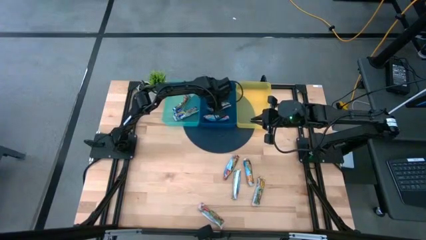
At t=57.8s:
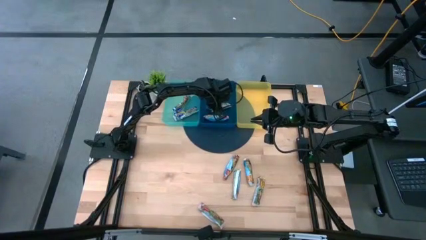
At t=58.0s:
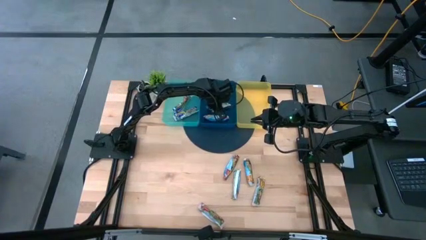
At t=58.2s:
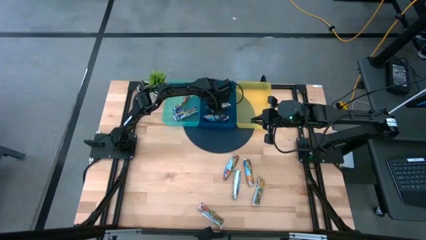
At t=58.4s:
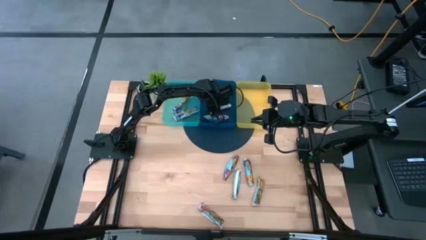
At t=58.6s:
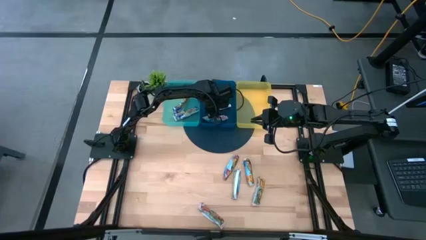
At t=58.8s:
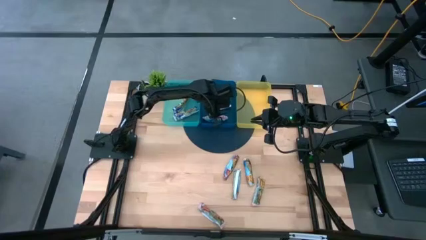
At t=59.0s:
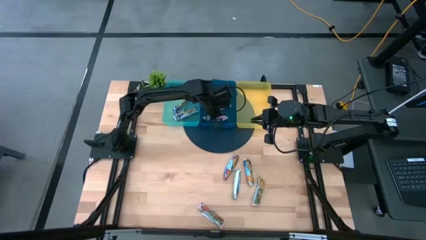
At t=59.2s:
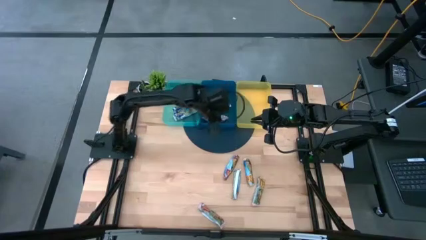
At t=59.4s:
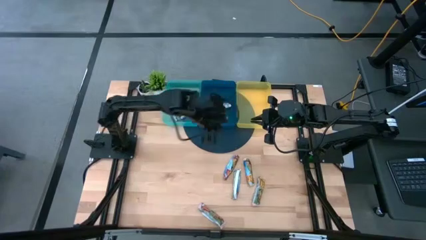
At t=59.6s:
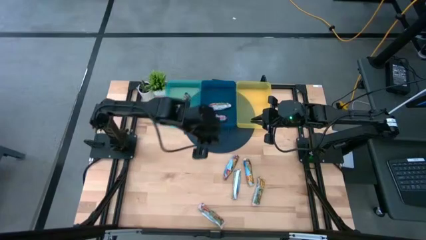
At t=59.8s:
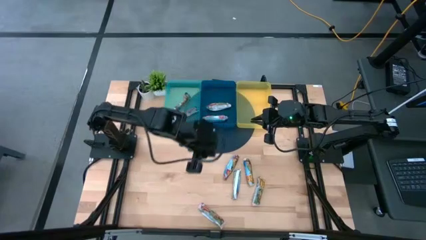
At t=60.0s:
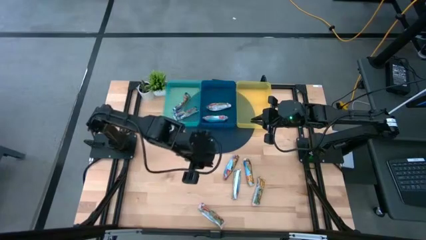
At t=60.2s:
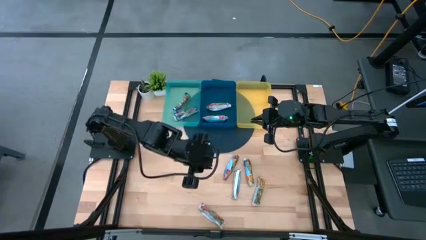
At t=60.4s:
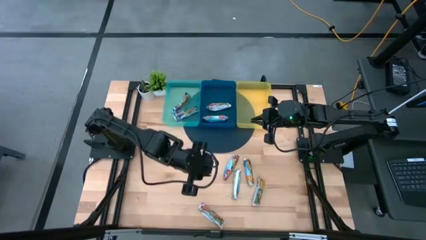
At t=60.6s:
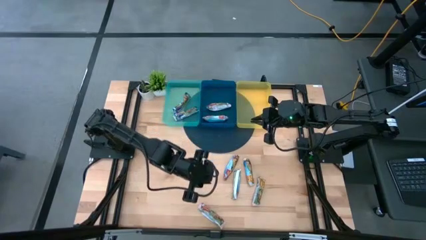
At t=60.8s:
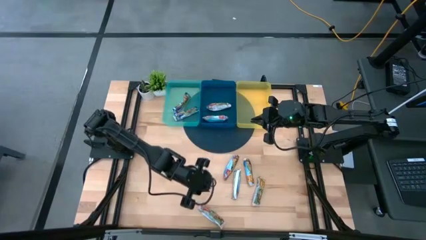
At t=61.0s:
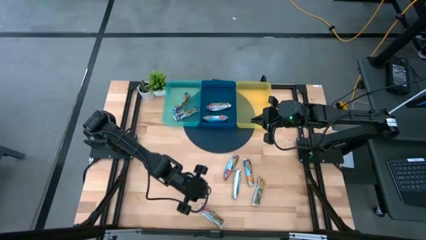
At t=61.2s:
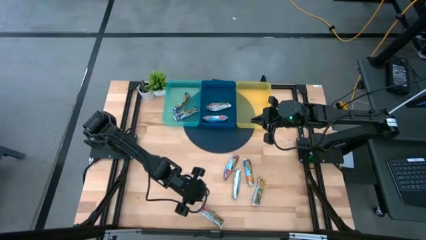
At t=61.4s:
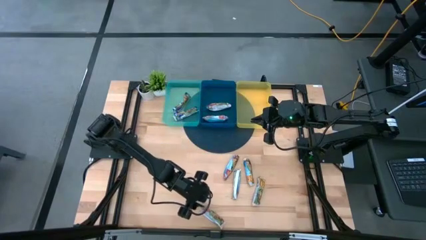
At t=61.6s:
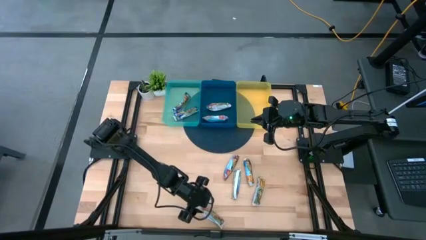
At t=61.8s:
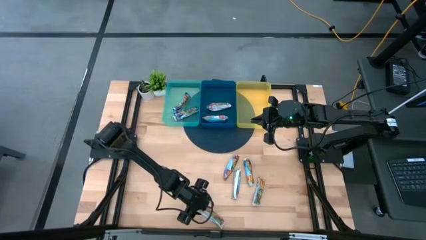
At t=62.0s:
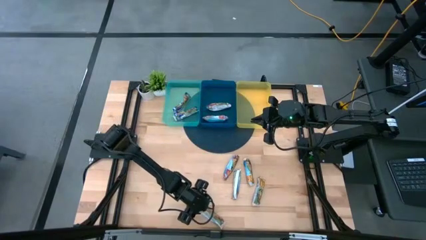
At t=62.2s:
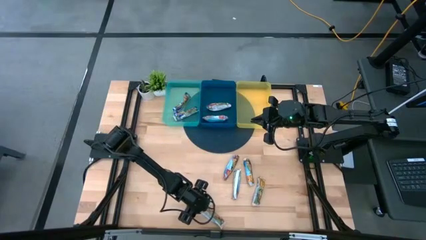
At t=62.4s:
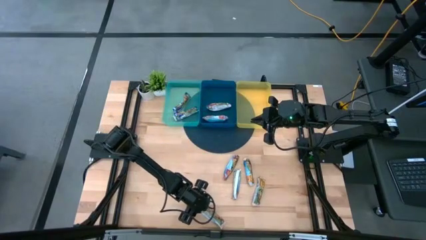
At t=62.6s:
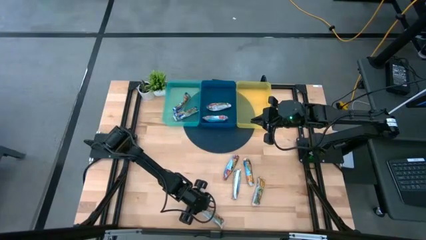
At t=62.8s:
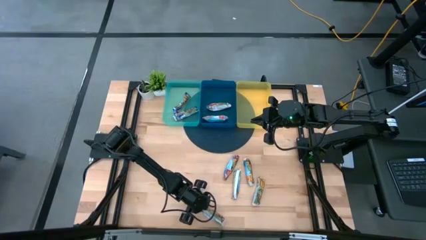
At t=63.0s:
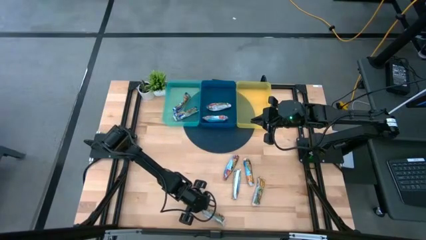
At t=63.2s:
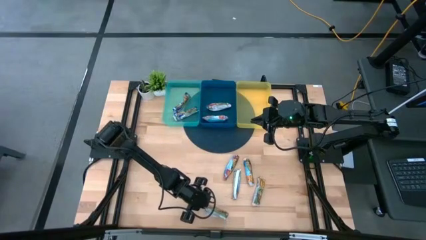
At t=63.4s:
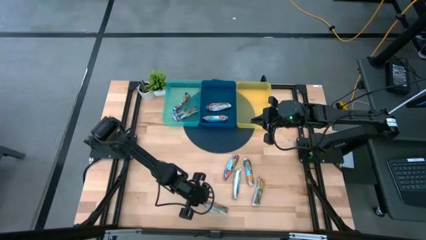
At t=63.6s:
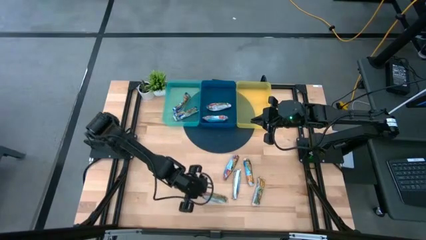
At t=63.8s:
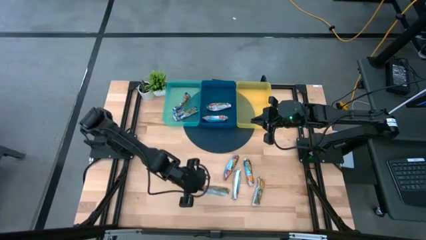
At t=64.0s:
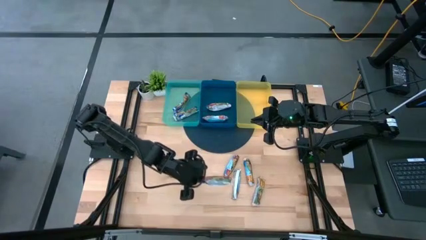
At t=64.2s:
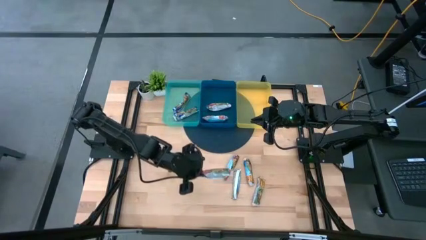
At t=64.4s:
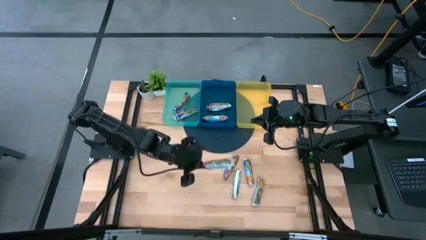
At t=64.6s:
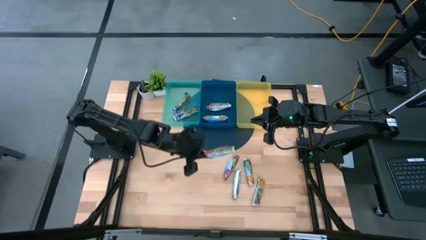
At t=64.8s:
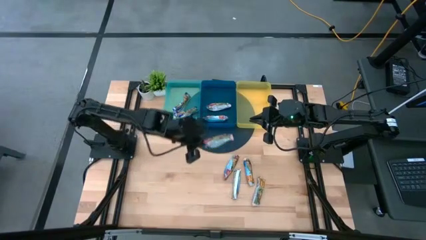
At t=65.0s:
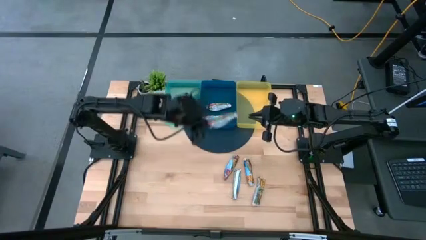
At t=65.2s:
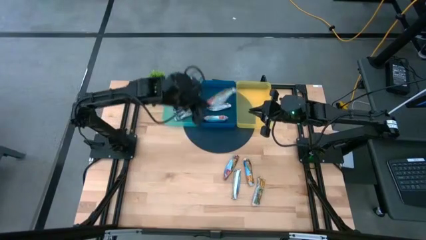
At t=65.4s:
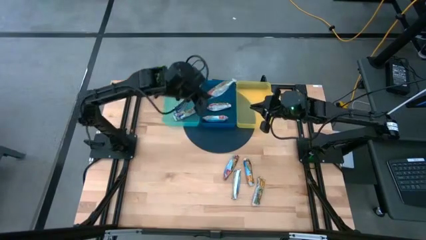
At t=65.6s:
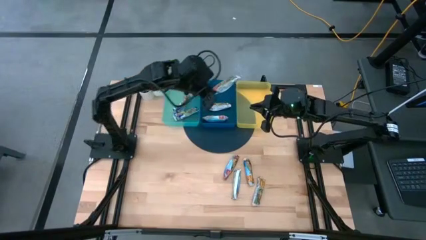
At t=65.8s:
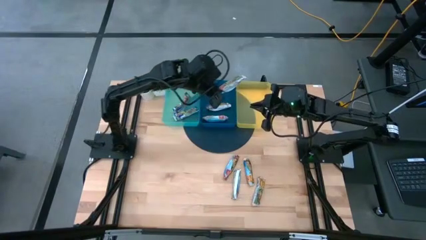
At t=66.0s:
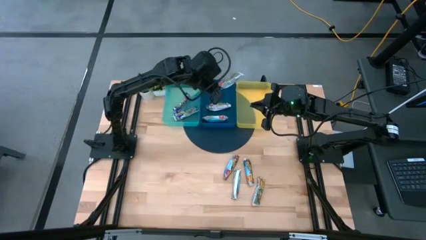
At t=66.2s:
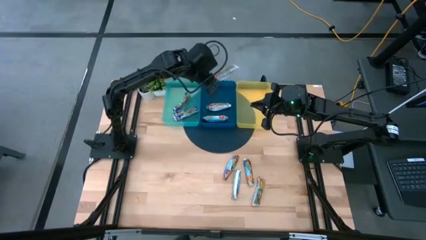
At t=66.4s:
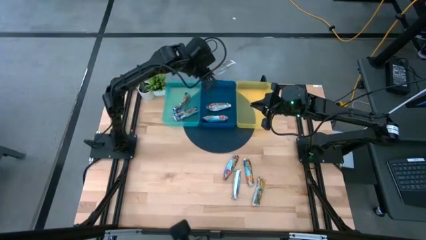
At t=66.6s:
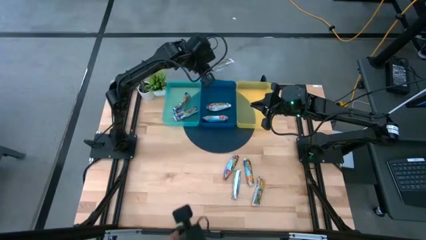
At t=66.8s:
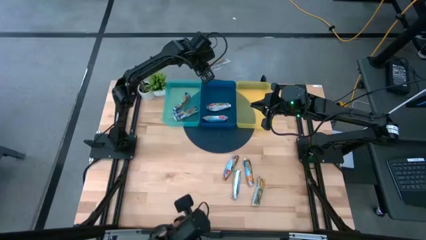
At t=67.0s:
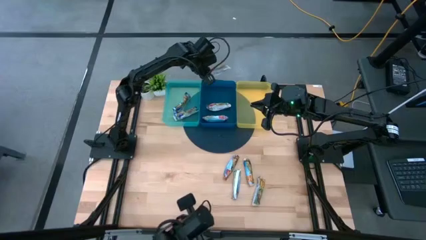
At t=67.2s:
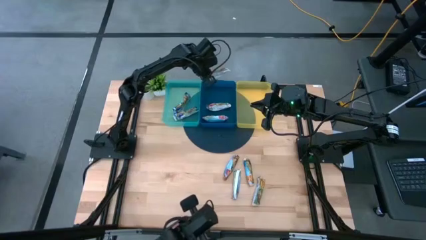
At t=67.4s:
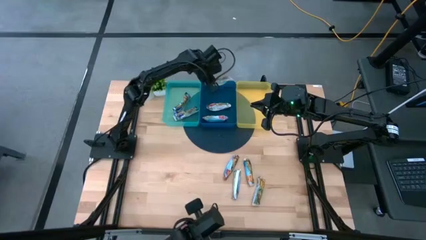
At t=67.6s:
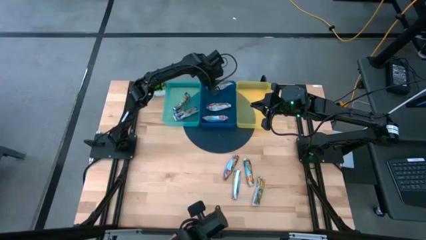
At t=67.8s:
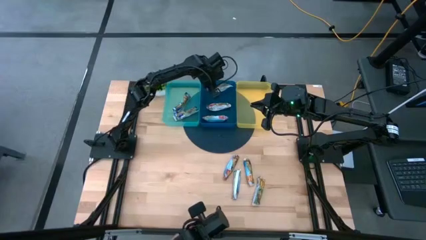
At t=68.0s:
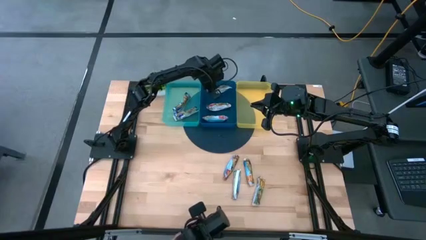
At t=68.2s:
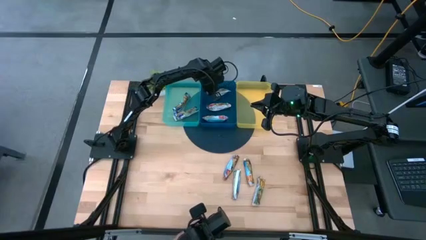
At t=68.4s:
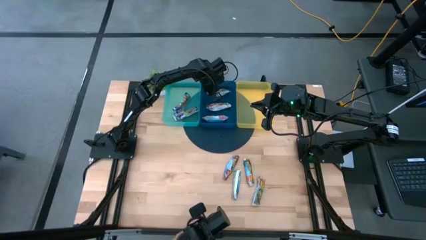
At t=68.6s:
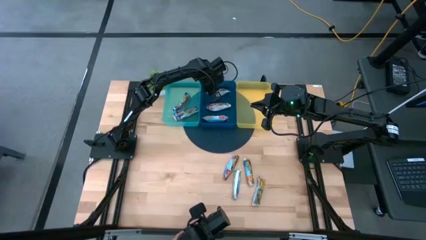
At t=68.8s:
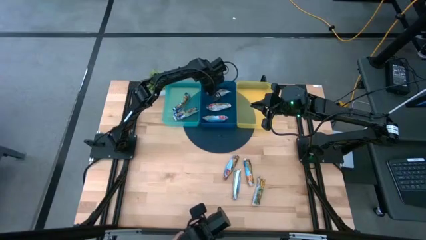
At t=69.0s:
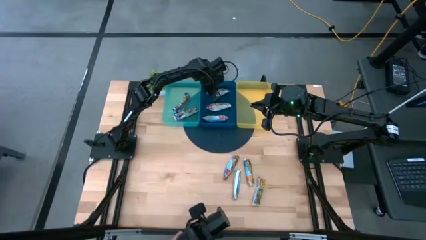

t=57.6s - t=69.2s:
Task: Pick and place Granola Bars by type
Put the bottom red granola bar into the blue bin
